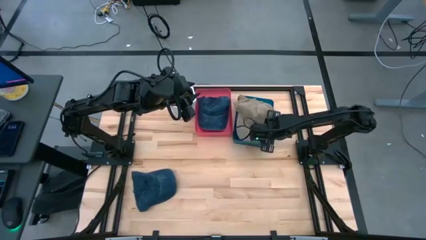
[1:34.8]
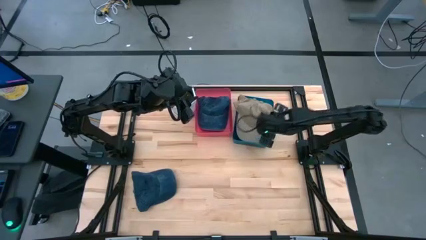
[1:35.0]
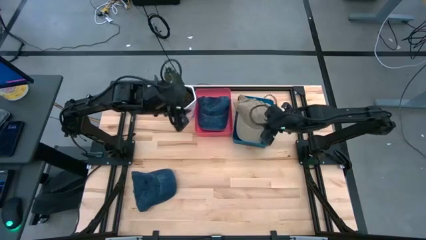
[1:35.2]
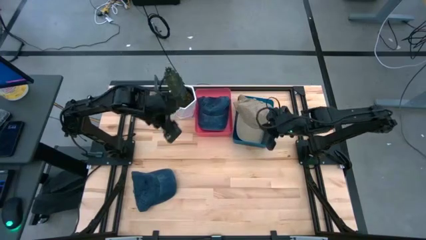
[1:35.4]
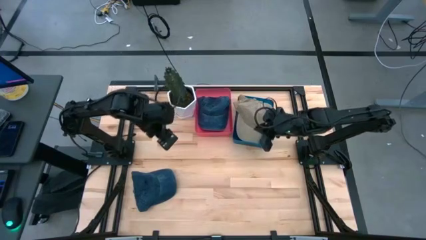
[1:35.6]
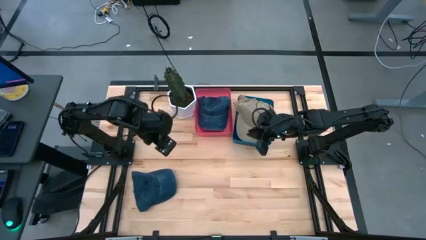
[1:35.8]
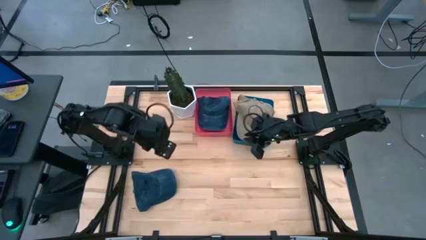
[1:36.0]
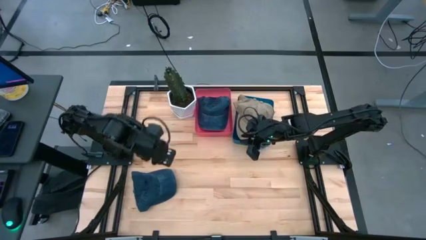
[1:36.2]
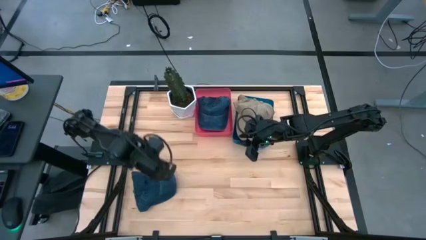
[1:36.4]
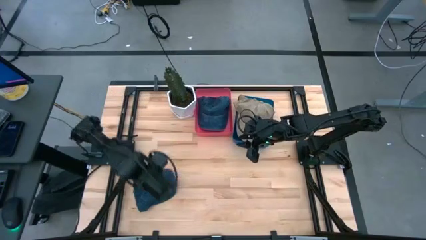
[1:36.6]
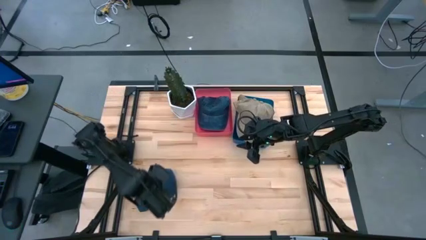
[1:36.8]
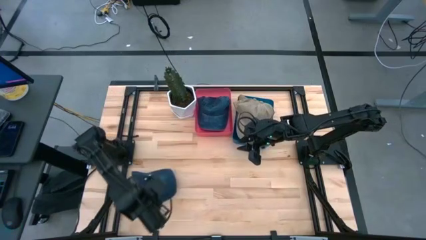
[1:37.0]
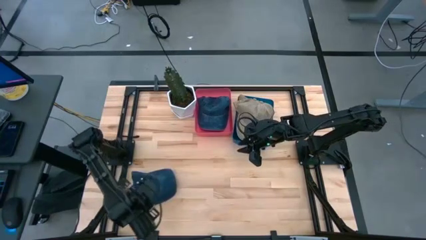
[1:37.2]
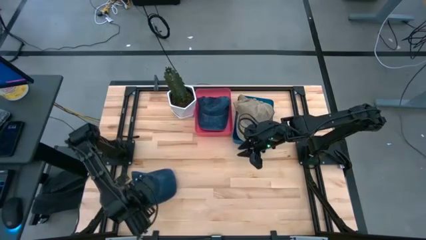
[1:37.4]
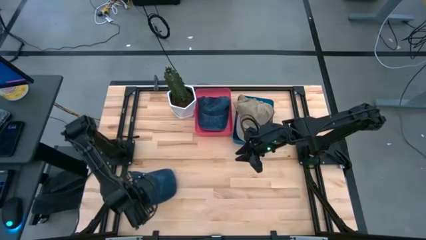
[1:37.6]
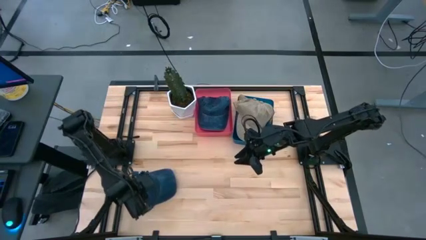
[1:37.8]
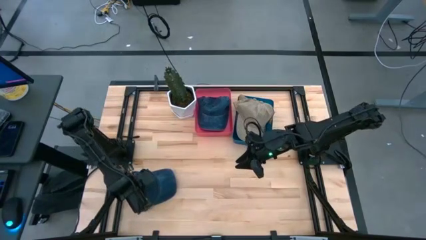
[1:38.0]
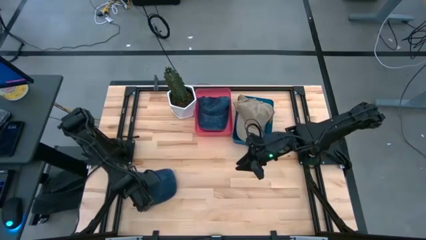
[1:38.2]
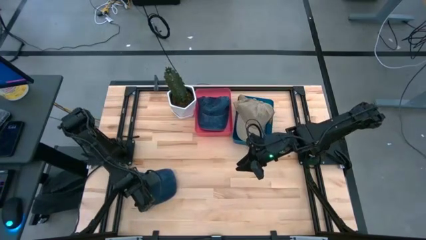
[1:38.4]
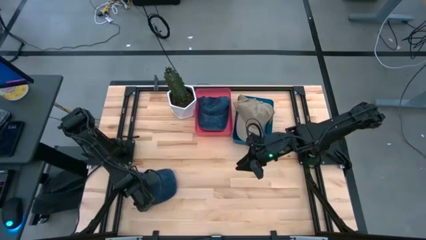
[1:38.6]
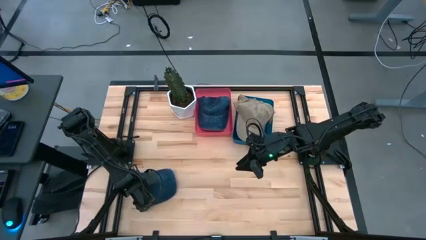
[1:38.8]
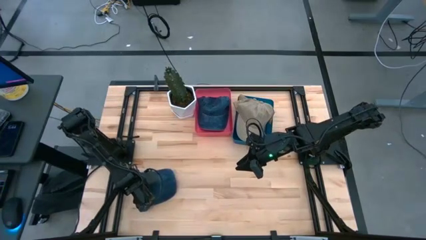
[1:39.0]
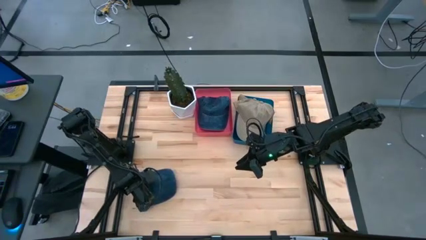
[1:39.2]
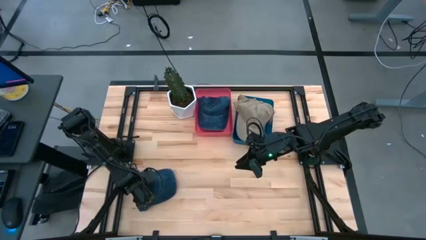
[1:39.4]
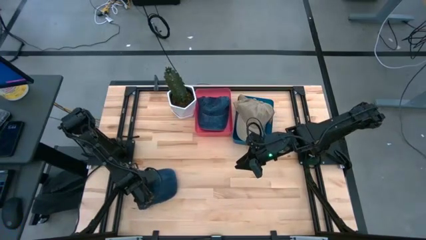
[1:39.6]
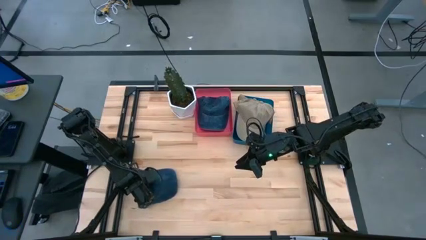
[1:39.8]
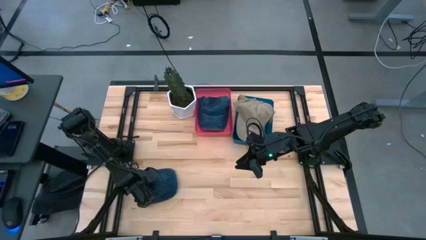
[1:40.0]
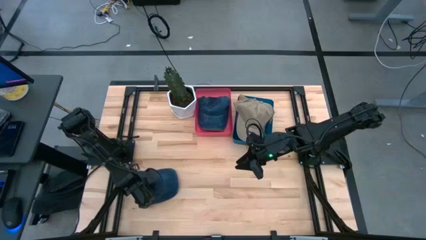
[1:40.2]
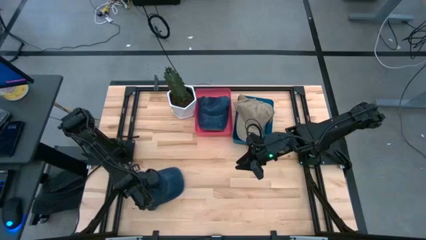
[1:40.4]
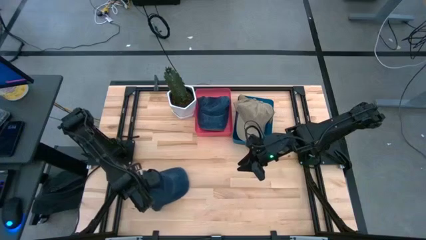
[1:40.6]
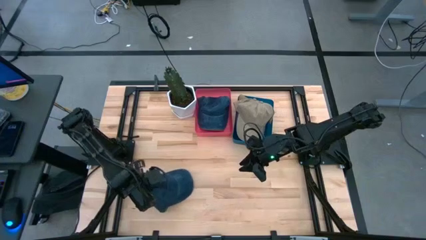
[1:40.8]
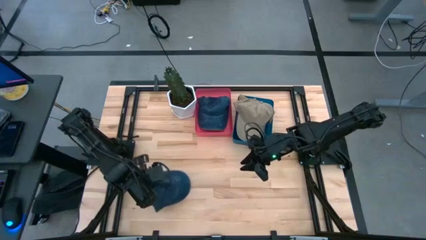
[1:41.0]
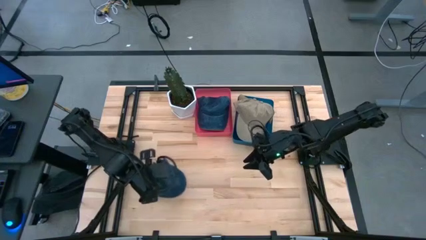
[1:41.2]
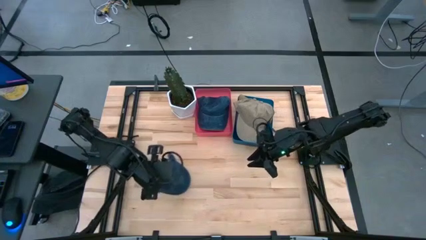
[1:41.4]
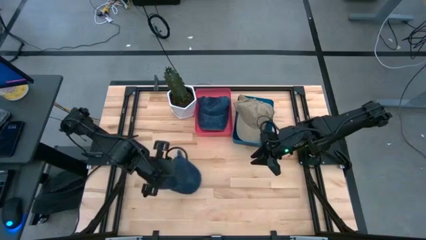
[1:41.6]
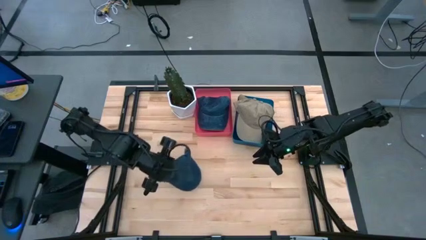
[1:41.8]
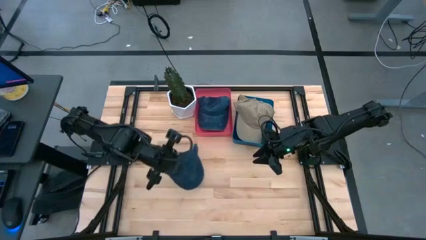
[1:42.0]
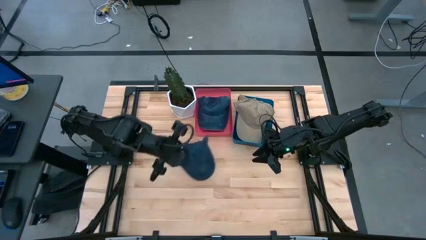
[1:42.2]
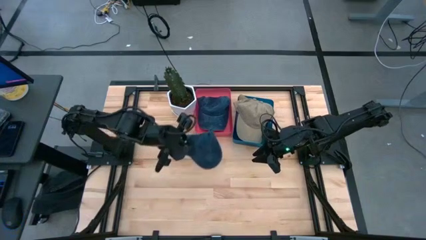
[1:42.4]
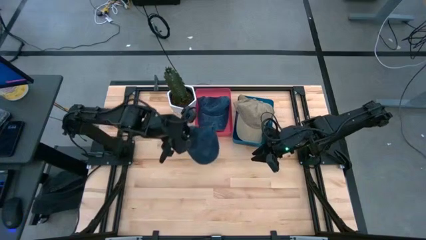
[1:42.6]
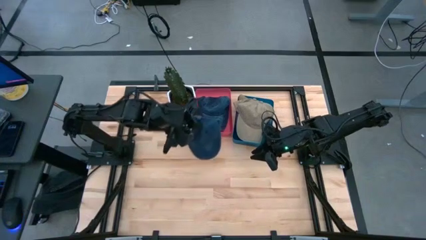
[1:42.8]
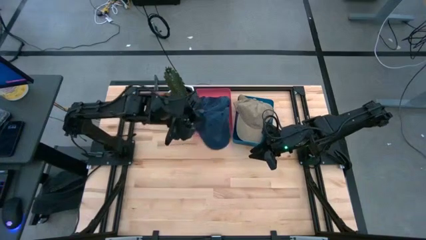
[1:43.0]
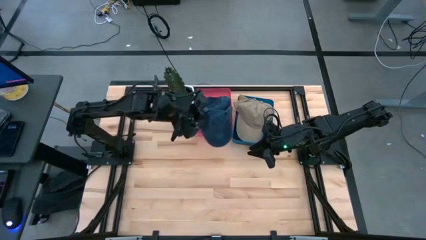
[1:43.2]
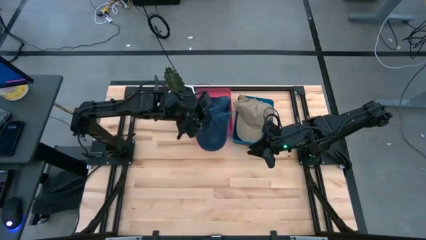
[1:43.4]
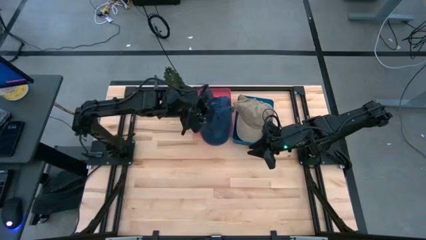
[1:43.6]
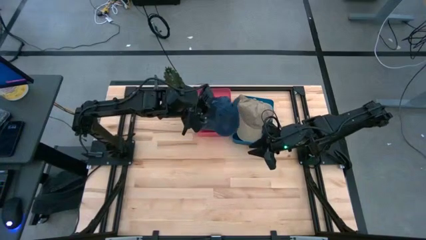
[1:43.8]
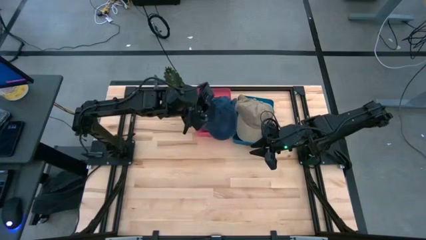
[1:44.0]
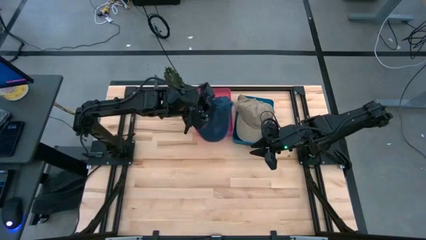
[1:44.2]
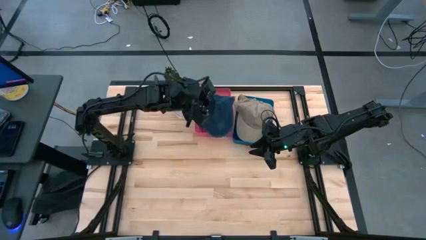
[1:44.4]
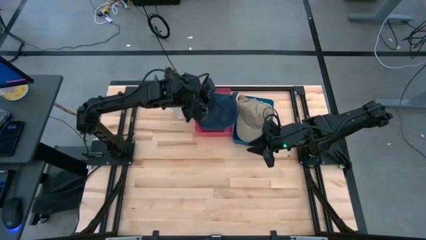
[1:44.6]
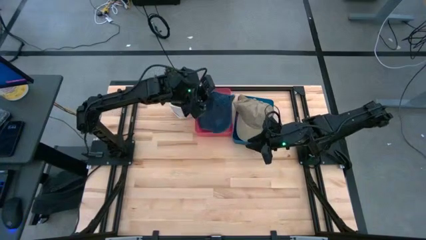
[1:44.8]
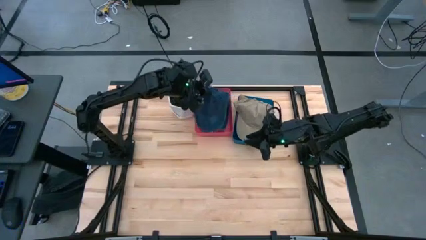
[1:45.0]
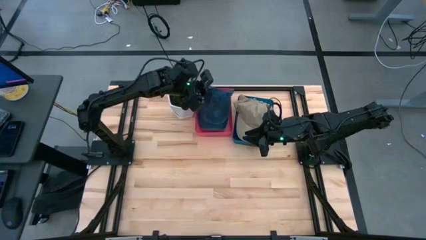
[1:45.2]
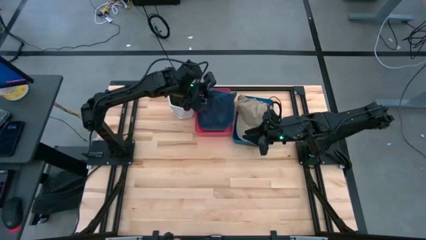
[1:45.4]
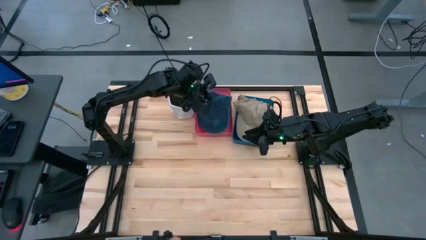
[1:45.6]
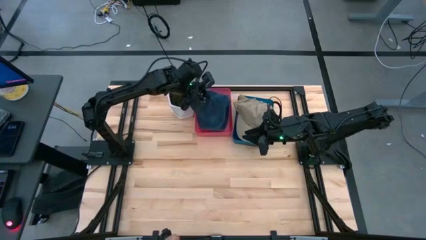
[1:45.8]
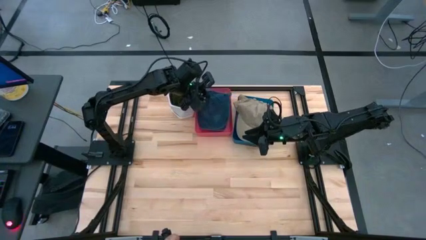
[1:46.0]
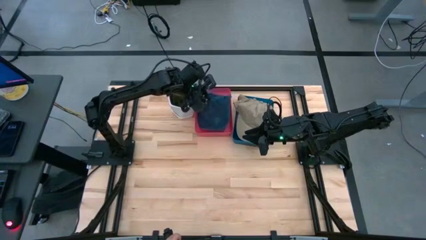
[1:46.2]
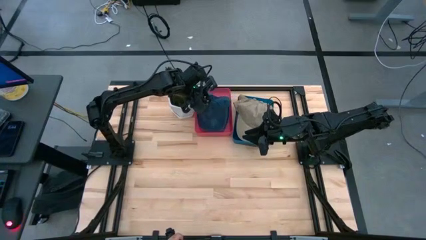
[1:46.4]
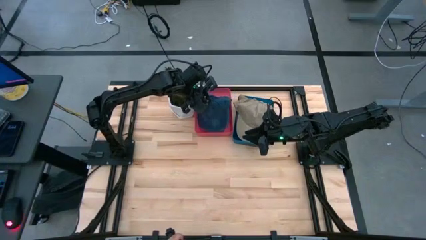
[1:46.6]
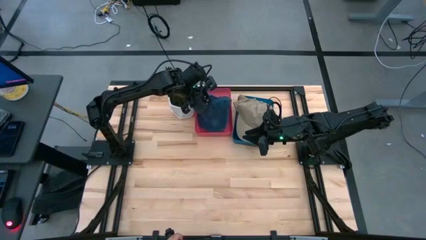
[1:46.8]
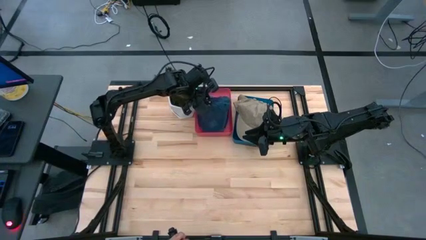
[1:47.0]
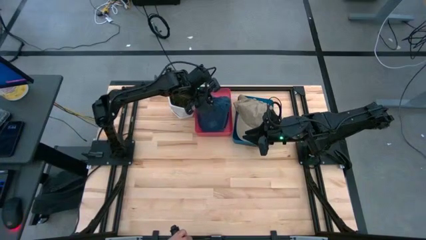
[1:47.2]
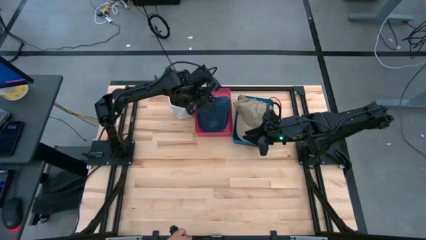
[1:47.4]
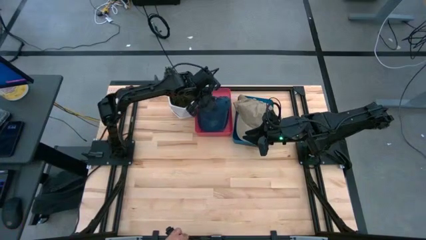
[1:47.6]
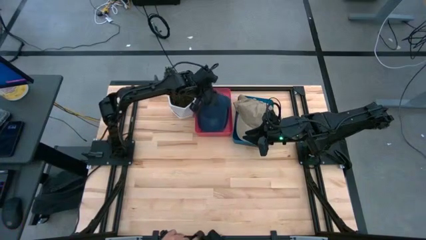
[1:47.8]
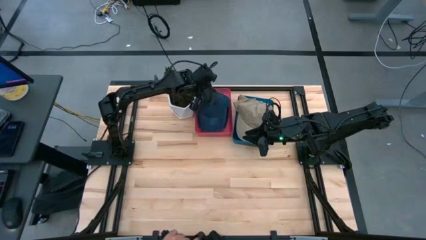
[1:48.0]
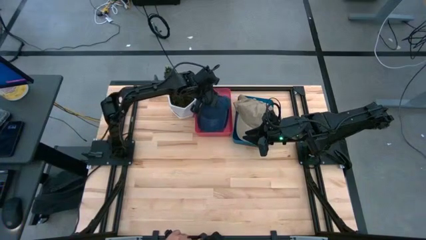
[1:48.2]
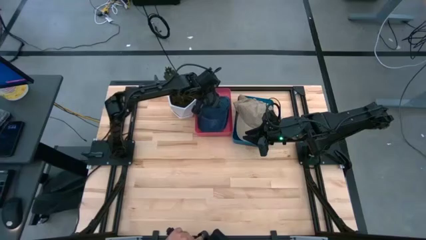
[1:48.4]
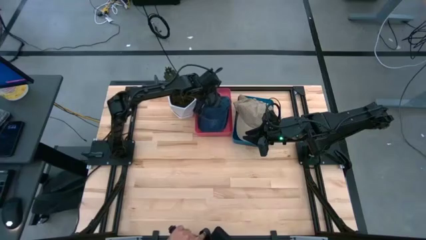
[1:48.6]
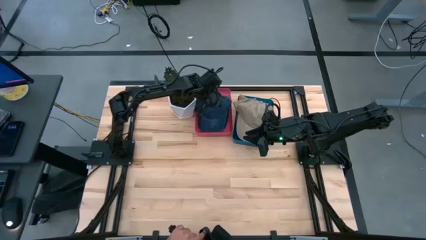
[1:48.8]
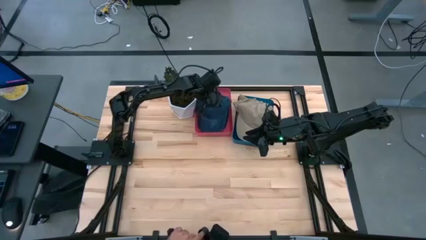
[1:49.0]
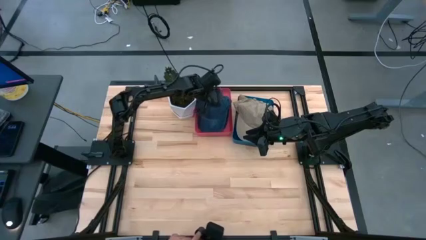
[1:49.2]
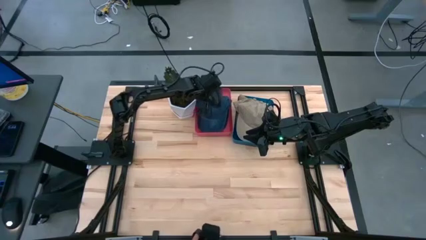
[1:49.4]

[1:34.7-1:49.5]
Task: Pick & Place hat
Put the blue cap into the pink bin
